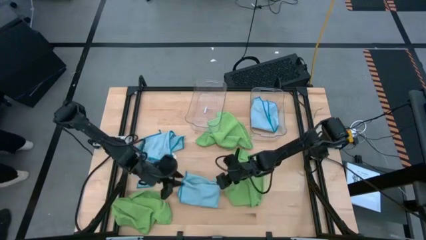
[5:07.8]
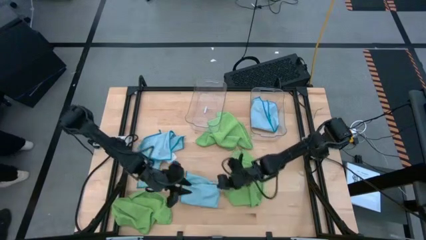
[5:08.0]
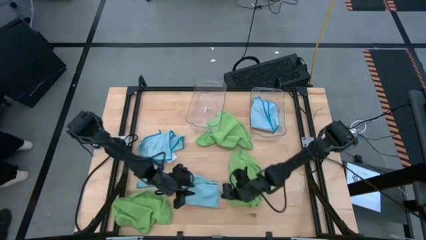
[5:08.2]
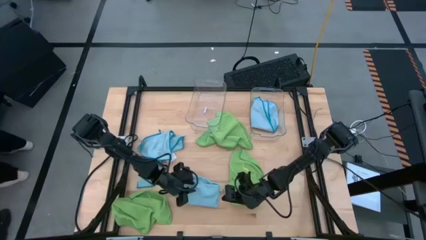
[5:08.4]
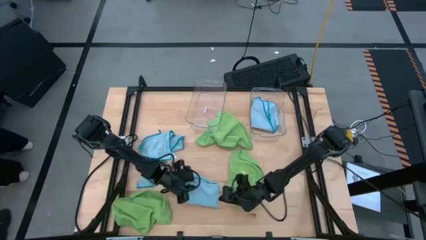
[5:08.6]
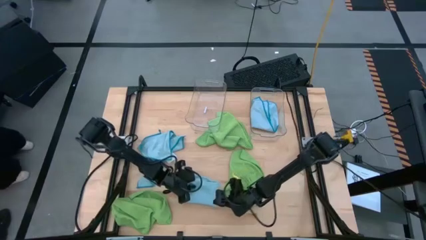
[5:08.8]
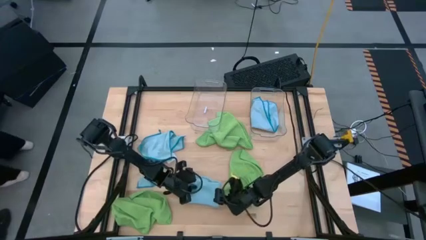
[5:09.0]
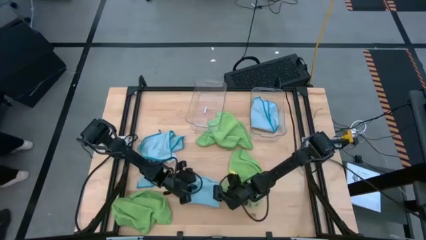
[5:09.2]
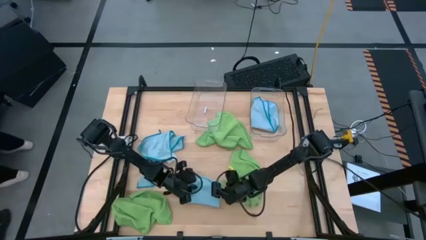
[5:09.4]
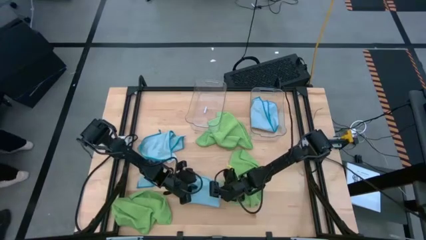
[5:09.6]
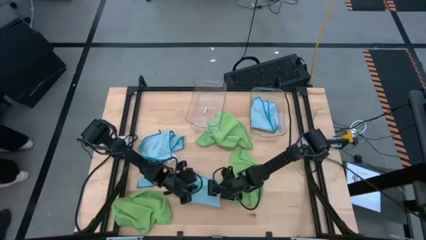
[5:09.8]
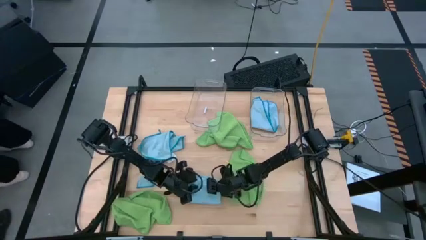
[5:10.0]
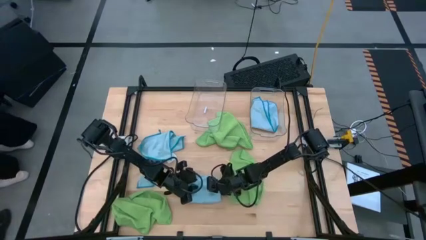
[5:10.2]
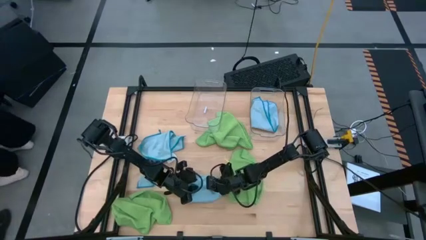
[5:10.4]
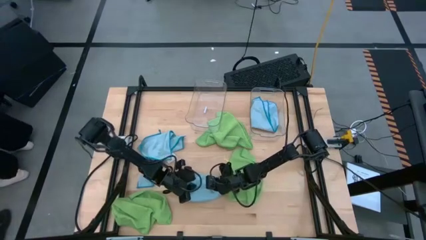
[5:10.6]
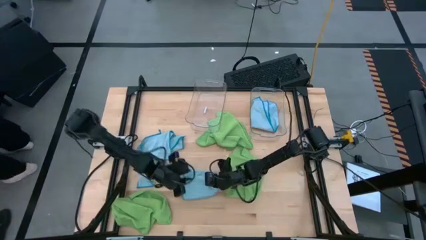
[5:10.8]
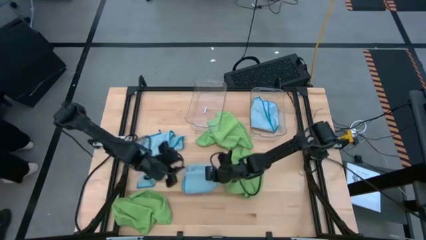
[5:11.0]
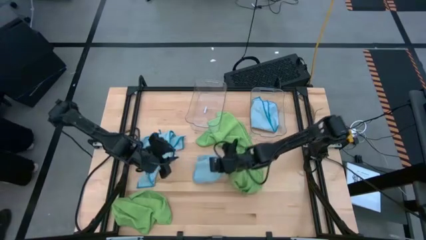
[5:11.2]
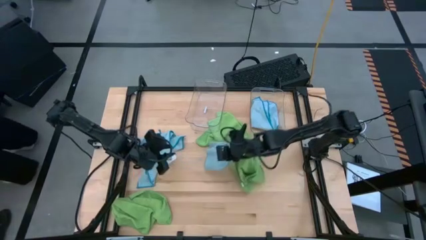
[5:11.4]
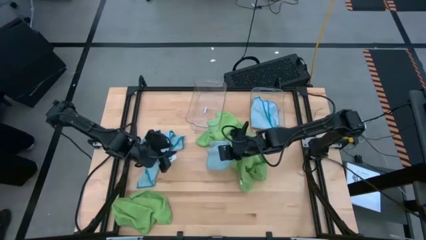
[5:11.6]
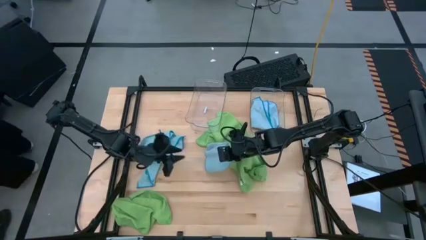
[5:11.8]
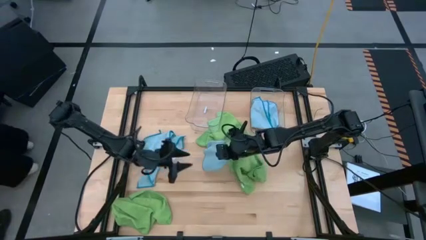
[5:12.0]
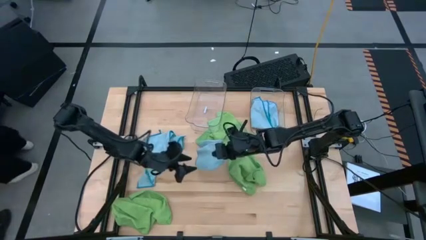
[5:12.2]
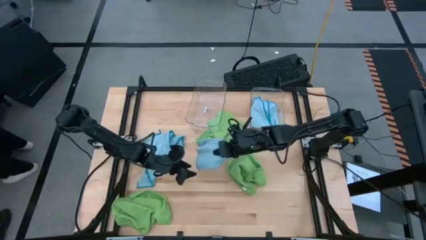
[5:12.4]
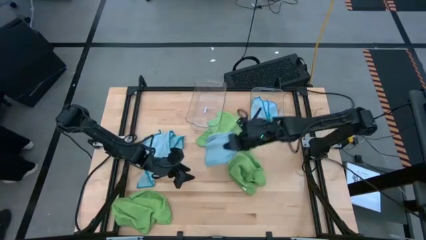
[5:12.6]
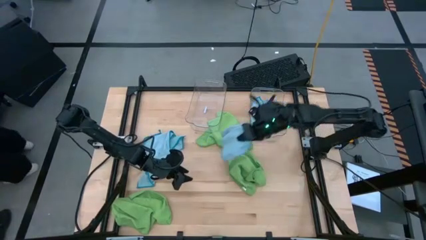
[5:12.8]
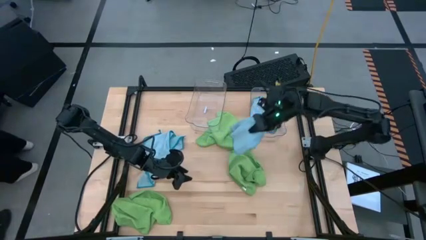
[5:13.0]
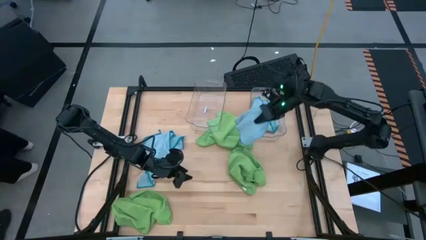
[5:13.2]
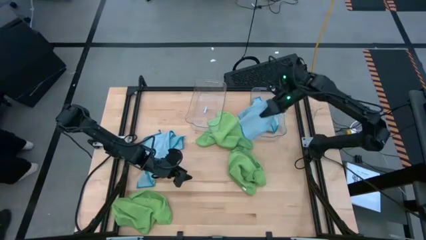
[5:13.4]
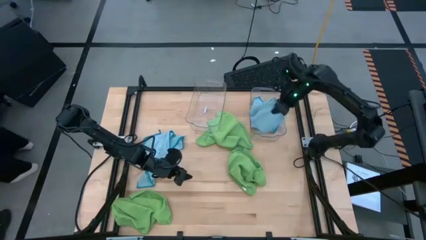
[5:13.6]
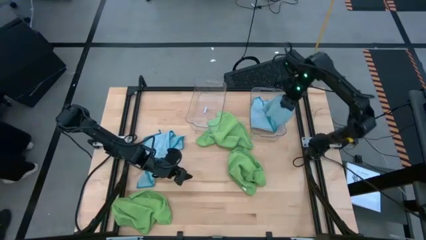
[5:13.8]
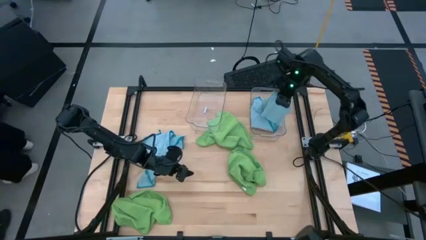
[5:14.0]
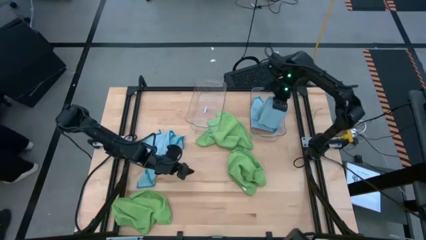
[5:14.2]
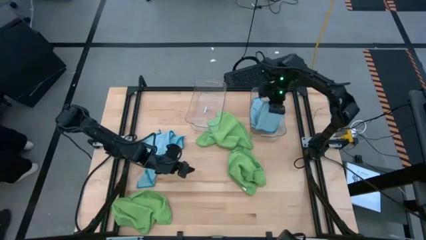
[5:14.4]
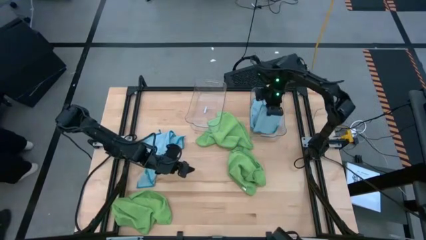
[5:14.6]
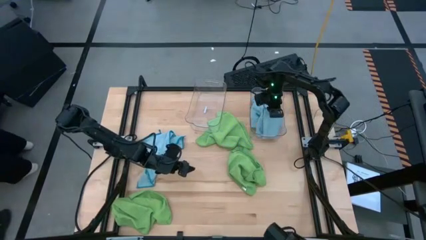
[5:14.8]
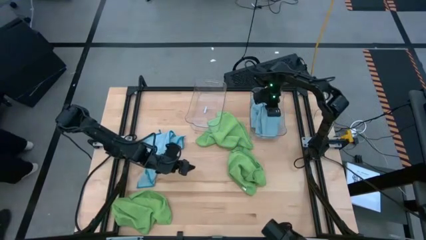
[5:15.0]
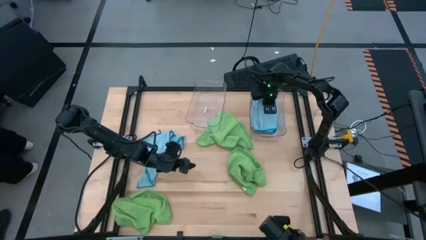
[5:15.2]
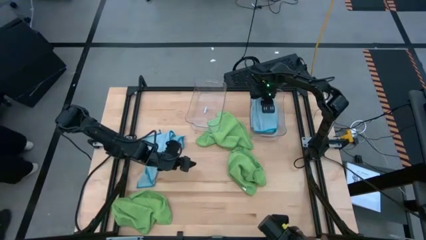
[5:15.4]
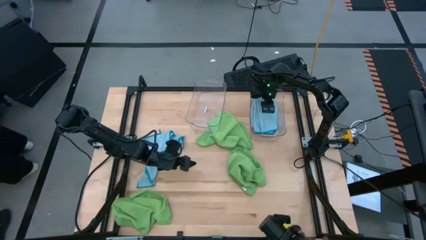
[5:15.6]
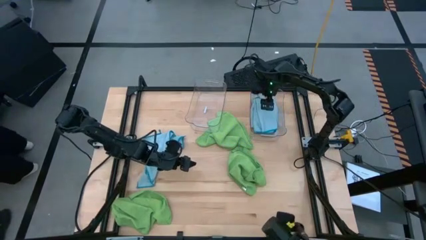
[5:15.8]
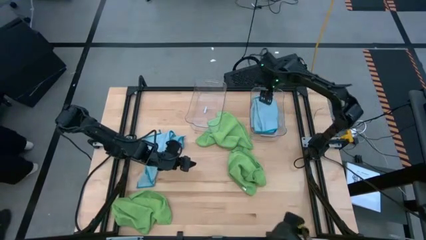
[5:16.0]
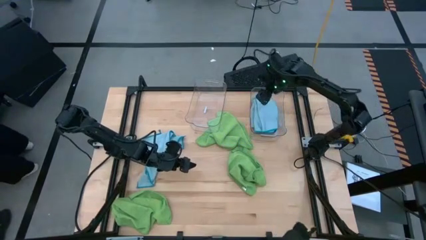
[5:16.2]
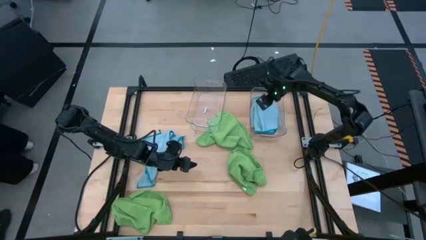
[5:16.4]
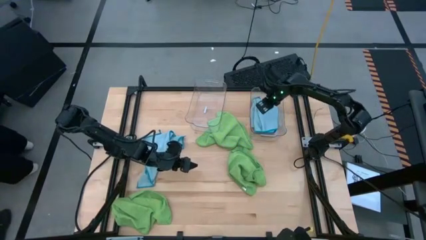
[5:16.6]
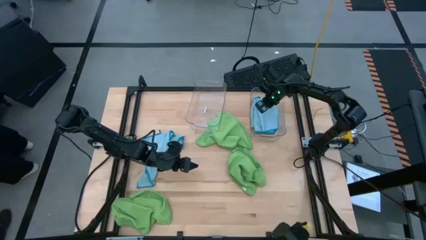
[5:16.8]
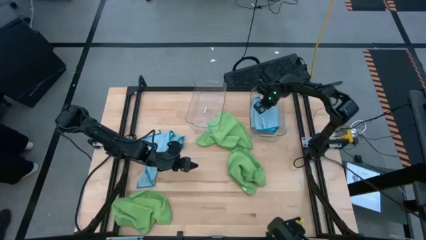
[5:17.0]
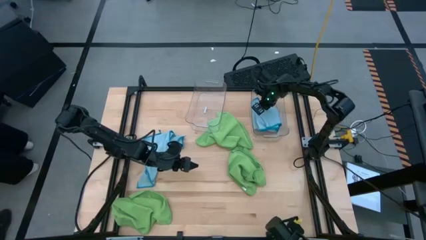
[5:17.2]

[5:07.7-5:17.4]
Task: Fold microfiber towels
Put the right blue microfiber towel into the right transparent bin

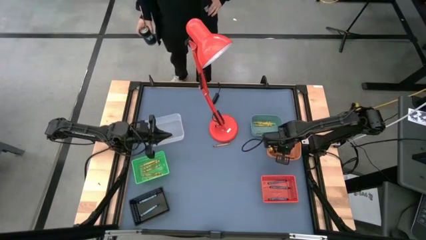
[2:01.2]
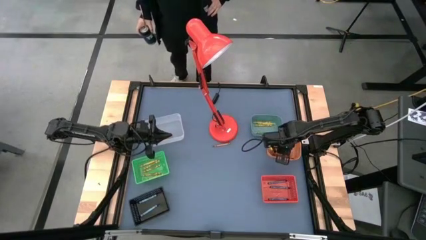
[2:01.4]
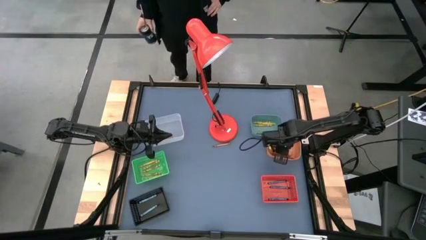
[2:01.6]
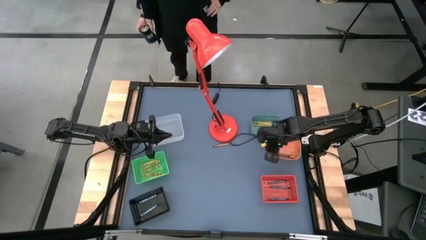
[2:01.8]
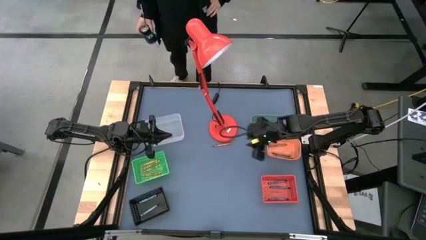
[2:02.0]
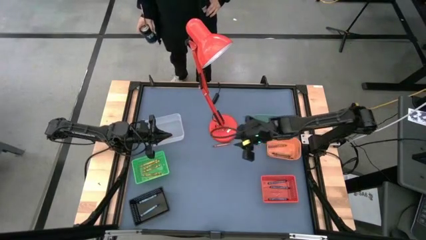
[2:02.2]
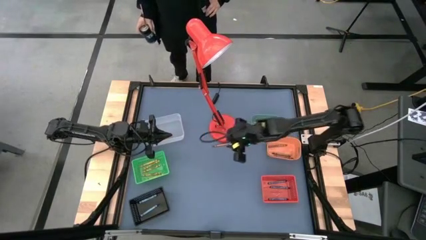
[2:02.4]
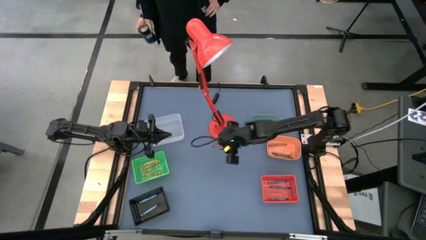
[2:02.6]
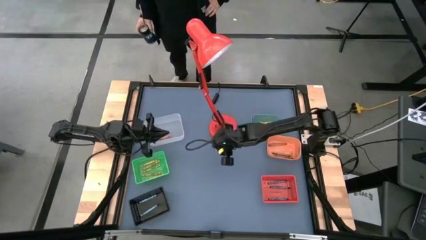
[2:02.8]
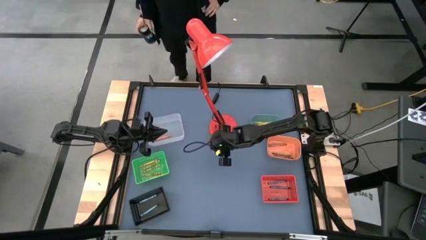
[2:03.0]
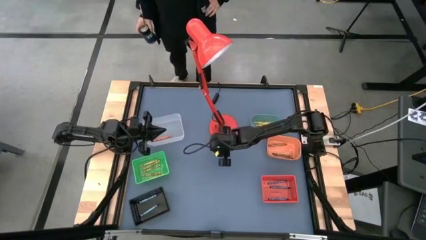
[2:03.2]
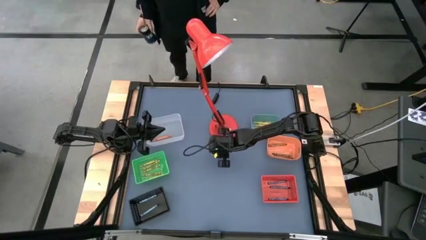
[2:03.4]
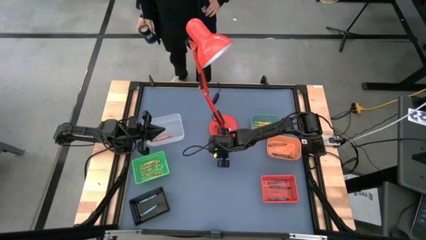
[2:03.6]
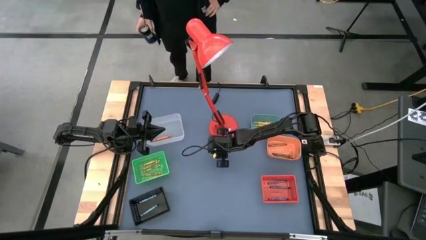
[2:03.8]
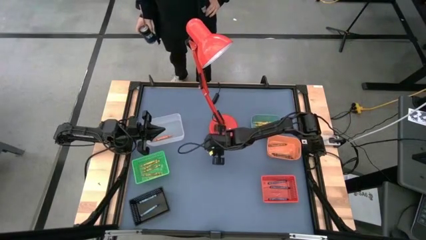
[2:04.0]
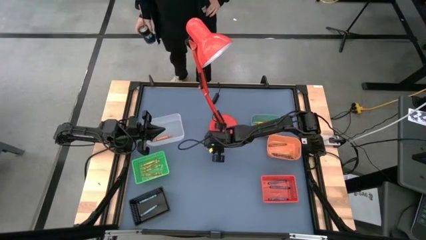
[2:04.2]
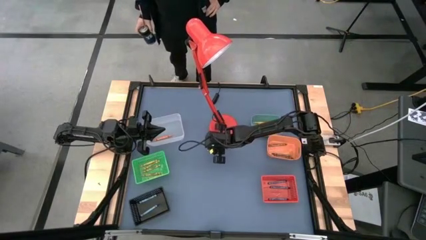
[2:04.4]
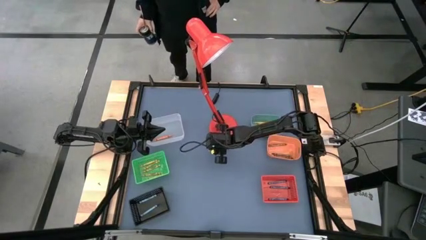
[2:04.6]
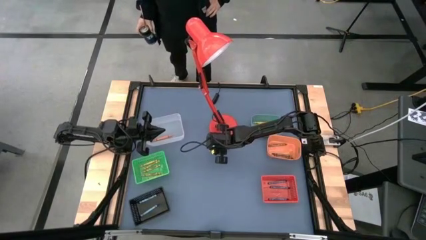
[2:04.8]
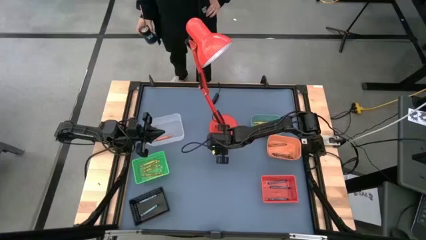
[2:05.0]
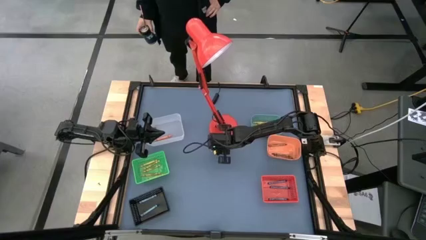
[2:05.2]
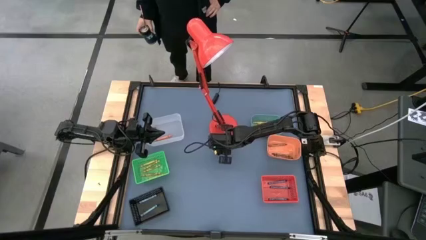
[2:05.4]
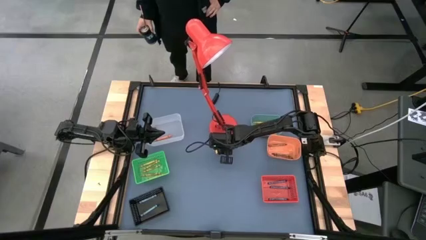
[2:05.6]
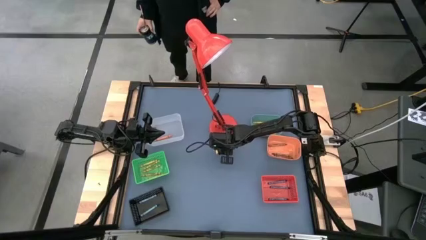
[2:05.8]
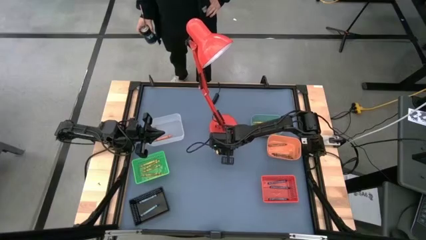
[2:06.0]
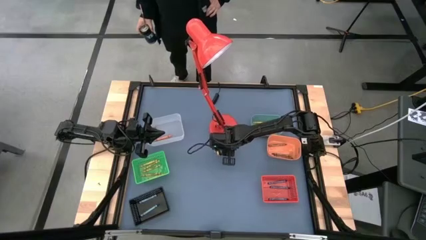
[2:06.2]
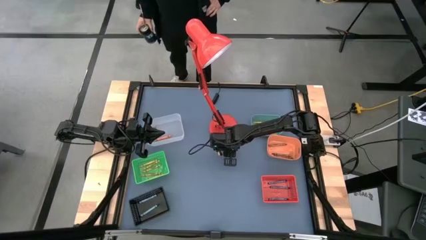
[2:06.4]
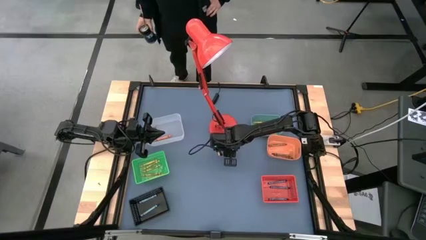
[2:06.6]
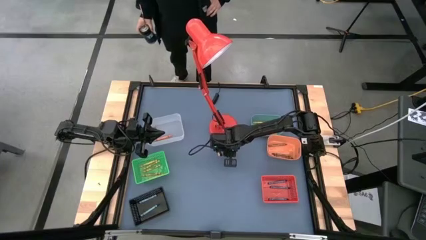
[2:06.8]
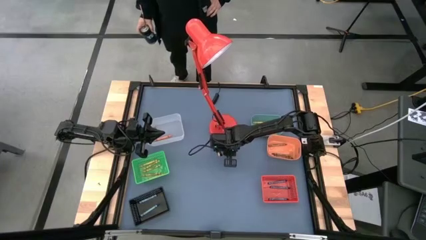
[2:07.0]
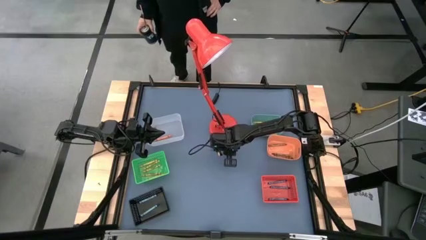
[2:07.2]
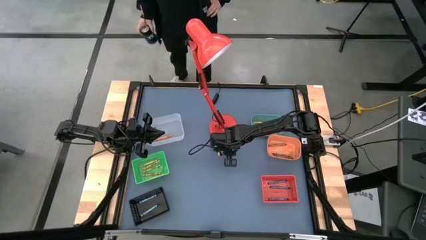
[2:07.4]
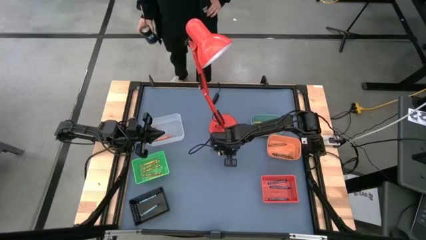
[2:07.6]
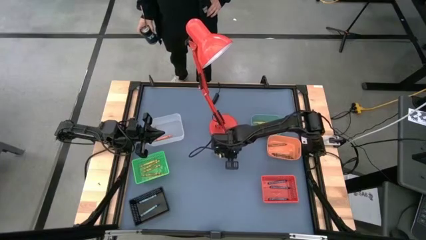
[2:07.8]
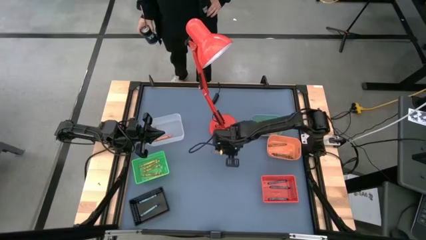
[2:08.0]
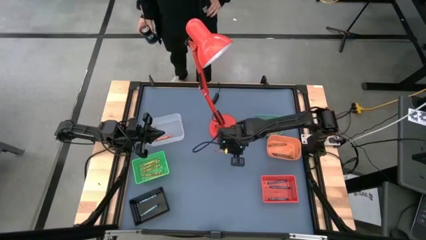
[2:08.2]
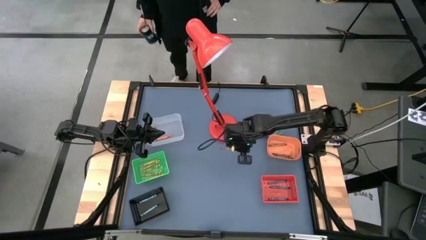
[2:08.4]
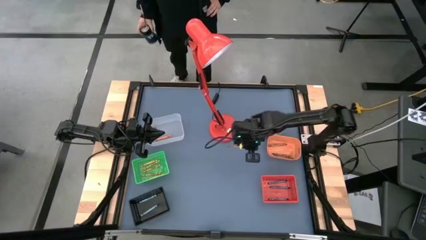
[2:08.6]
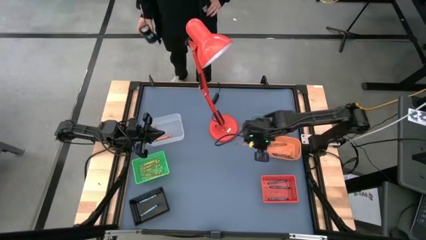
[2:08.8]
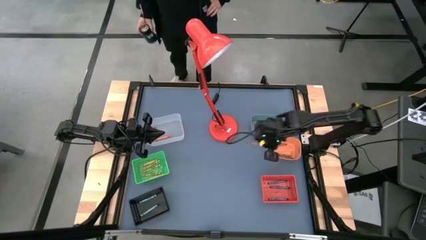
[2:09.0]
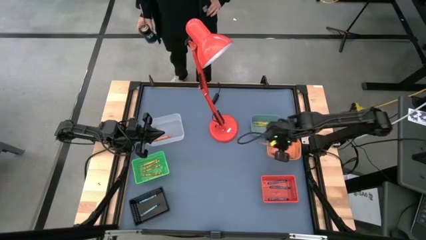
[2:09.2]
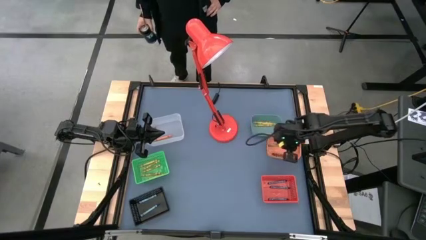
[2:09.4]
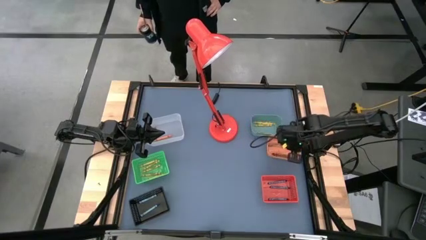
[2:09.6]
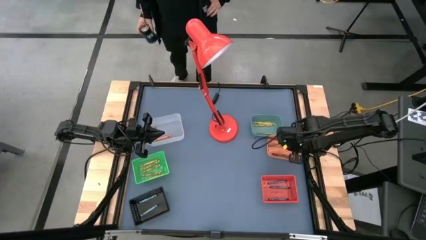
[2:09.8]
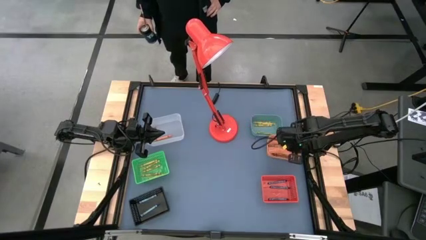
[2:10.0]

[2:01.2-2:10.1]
Task: Sort crayons
Put the brown crayon into the orange bin
